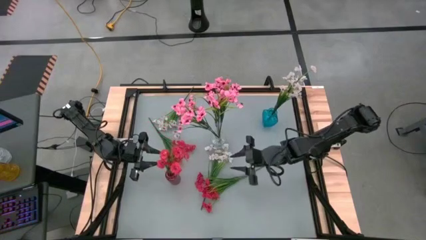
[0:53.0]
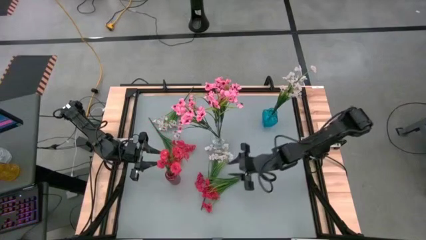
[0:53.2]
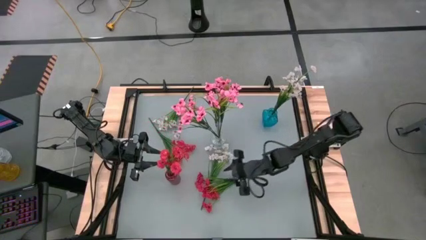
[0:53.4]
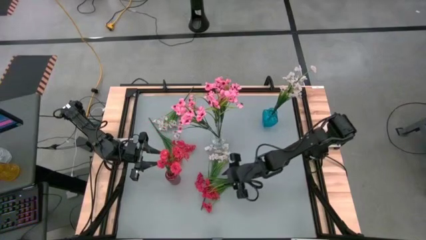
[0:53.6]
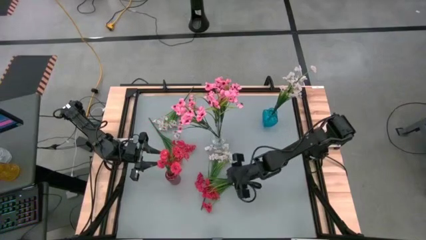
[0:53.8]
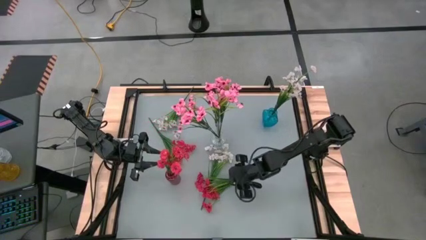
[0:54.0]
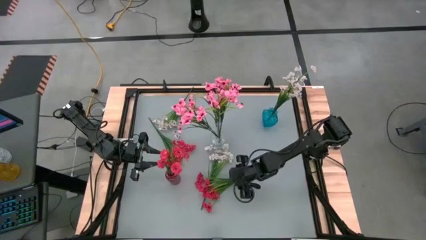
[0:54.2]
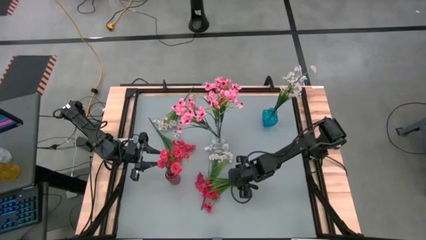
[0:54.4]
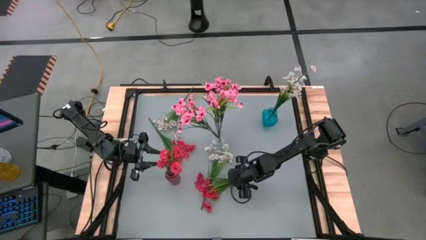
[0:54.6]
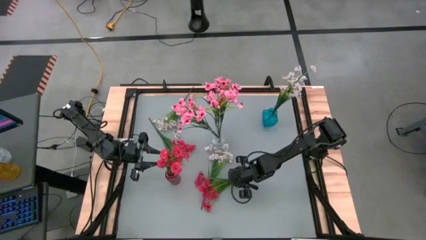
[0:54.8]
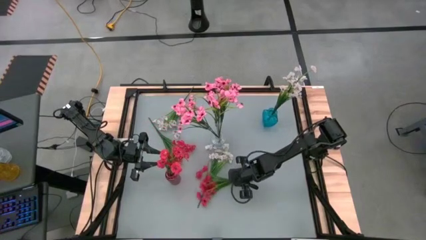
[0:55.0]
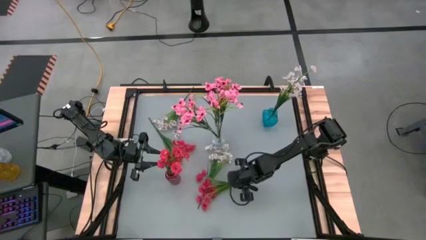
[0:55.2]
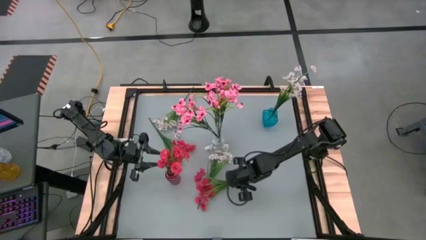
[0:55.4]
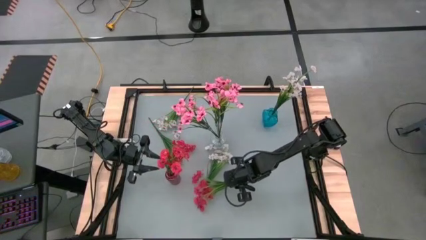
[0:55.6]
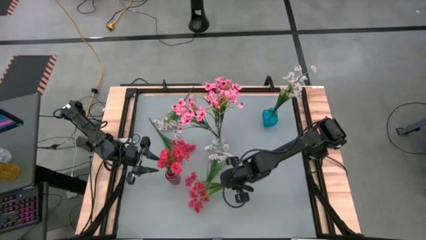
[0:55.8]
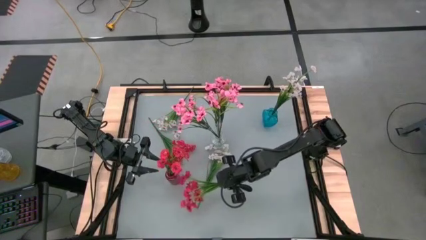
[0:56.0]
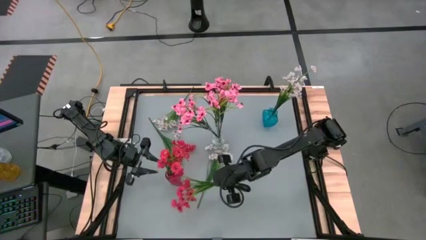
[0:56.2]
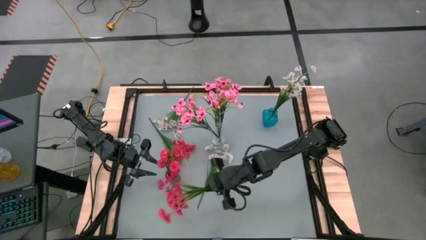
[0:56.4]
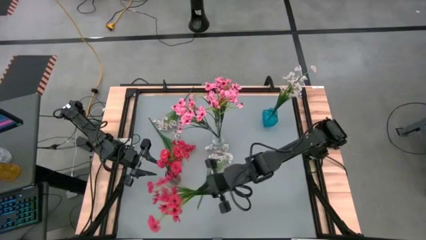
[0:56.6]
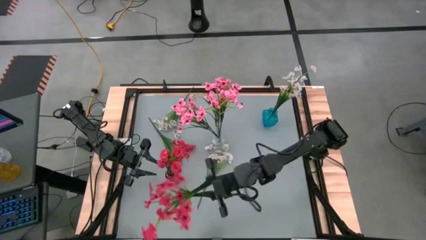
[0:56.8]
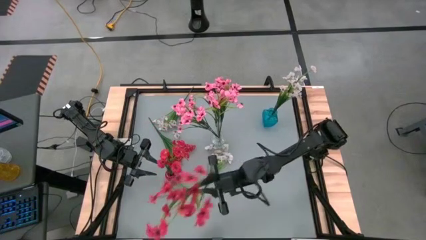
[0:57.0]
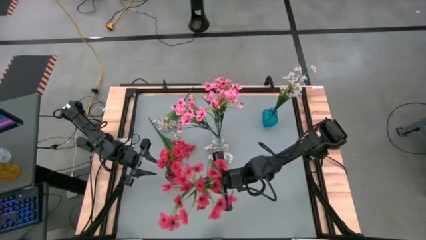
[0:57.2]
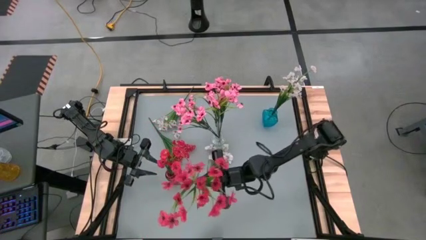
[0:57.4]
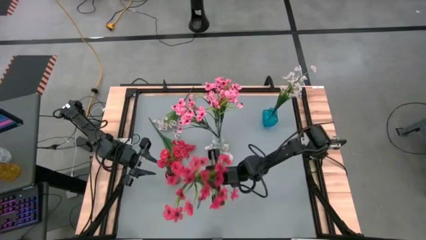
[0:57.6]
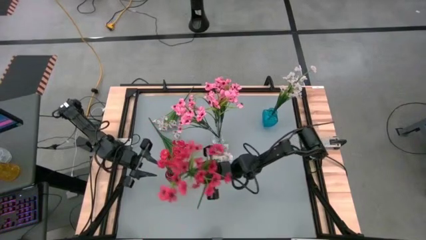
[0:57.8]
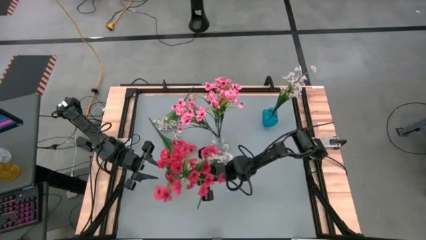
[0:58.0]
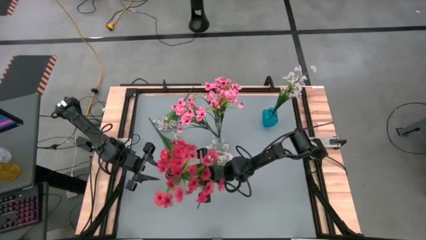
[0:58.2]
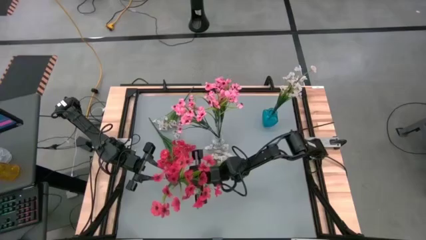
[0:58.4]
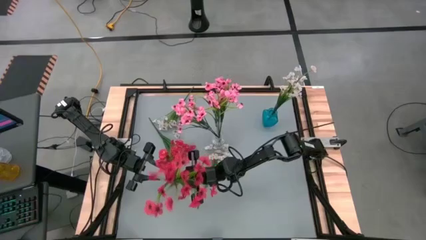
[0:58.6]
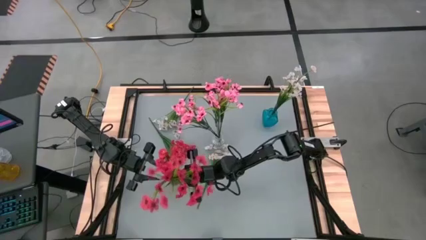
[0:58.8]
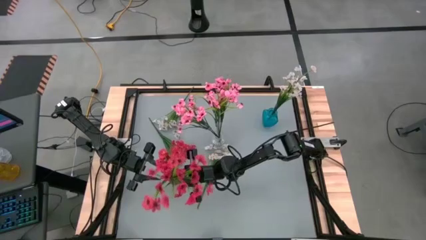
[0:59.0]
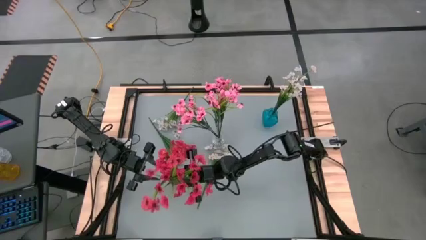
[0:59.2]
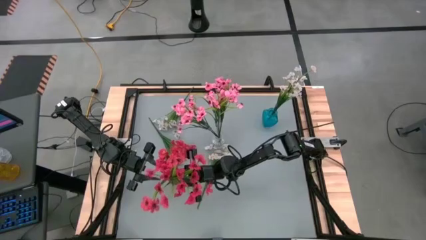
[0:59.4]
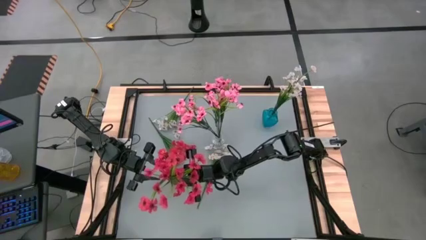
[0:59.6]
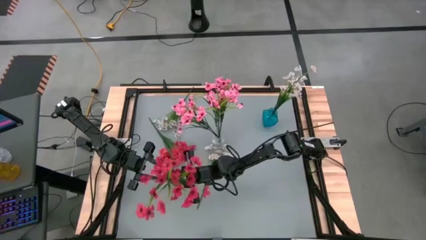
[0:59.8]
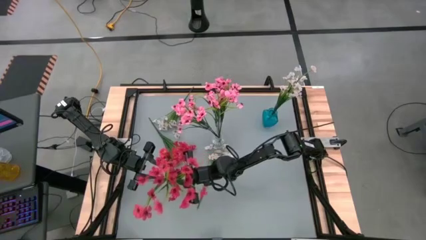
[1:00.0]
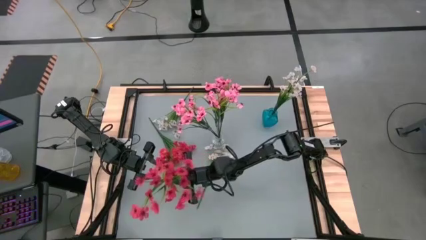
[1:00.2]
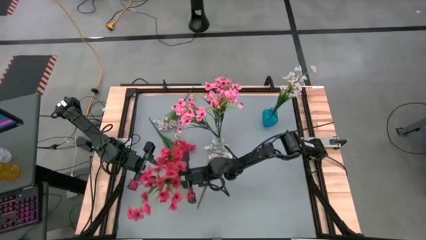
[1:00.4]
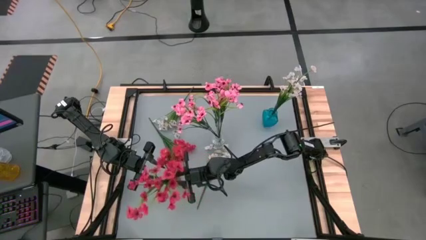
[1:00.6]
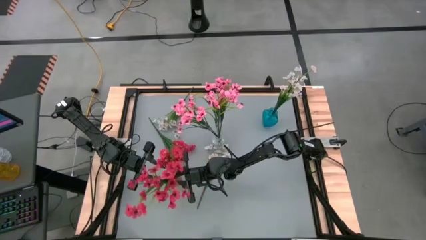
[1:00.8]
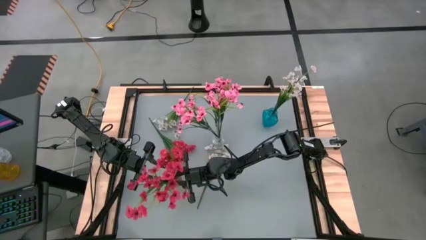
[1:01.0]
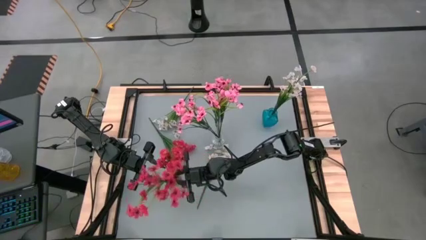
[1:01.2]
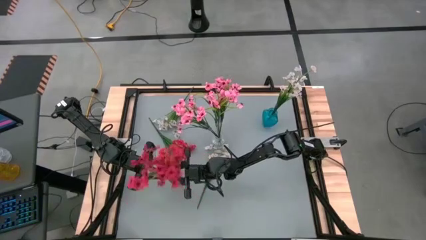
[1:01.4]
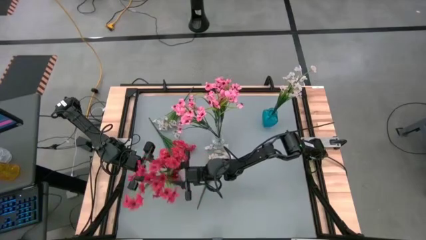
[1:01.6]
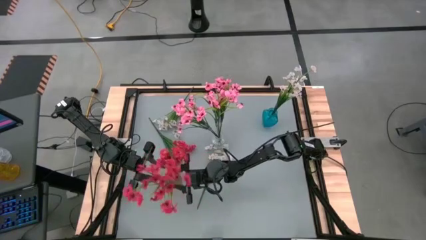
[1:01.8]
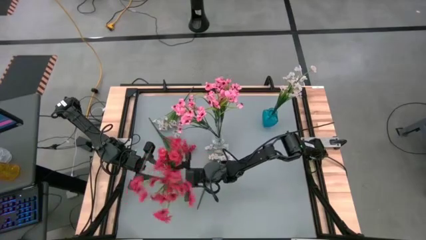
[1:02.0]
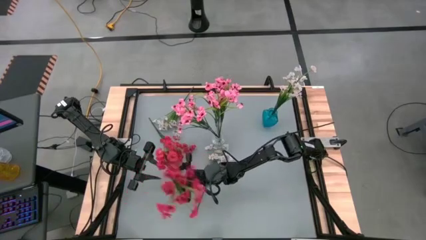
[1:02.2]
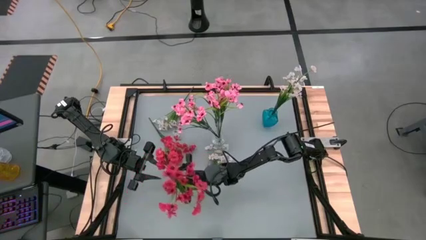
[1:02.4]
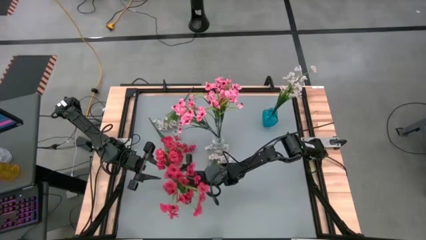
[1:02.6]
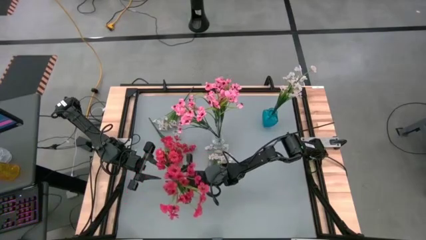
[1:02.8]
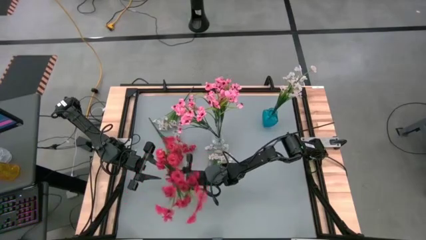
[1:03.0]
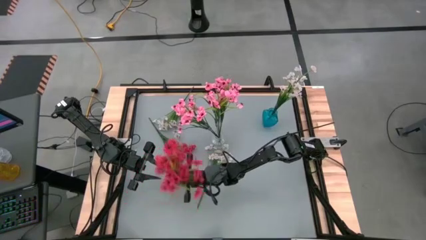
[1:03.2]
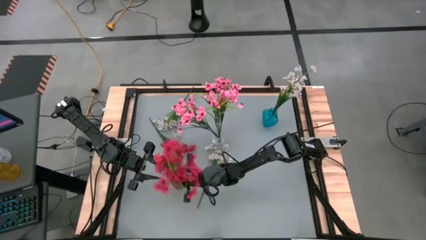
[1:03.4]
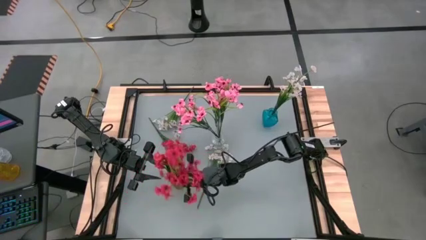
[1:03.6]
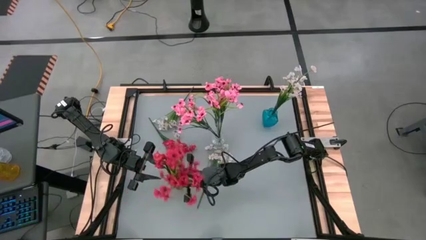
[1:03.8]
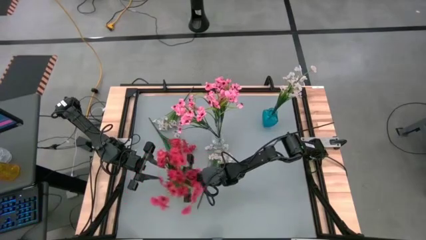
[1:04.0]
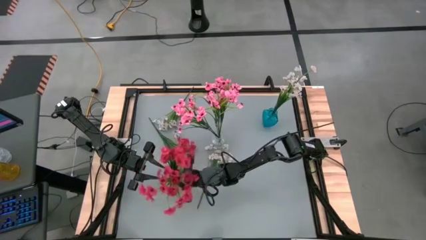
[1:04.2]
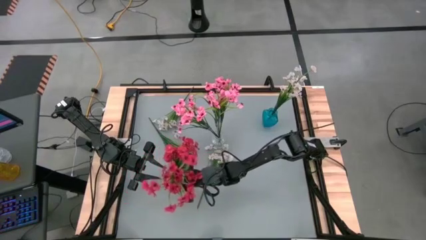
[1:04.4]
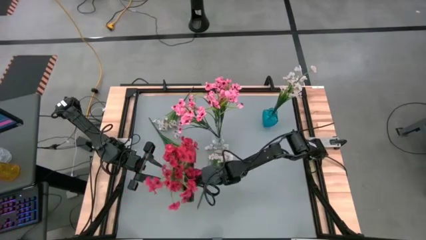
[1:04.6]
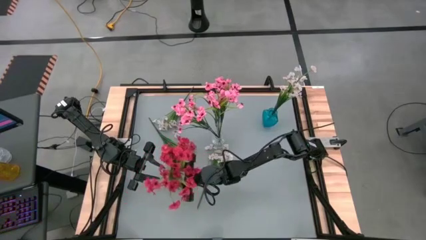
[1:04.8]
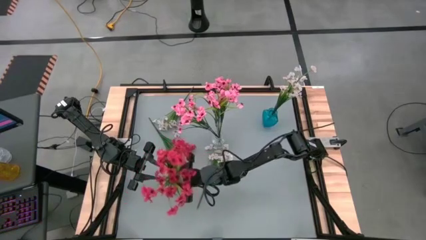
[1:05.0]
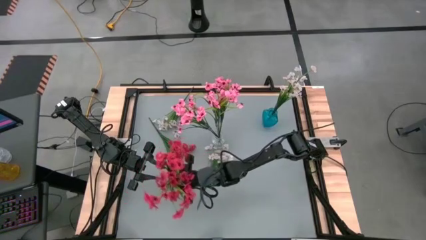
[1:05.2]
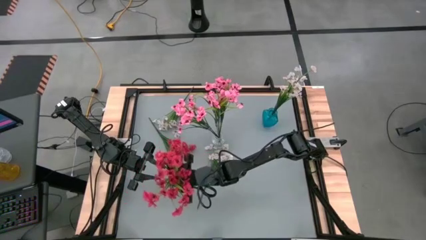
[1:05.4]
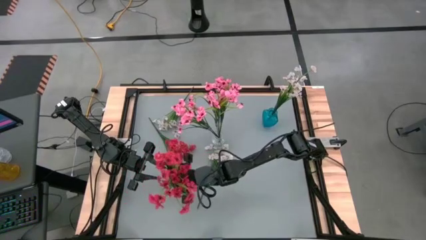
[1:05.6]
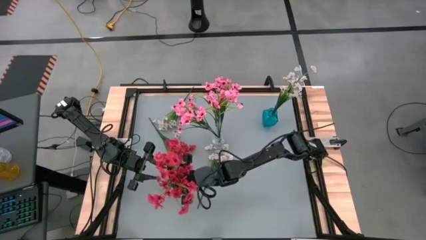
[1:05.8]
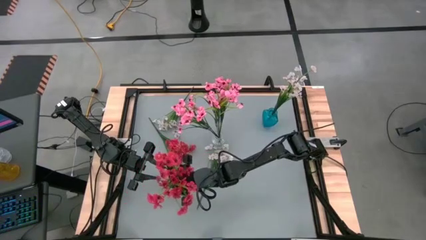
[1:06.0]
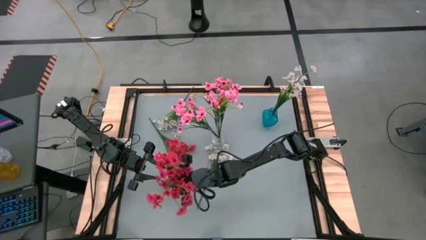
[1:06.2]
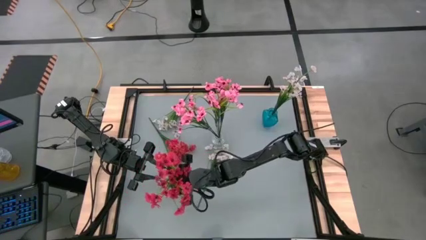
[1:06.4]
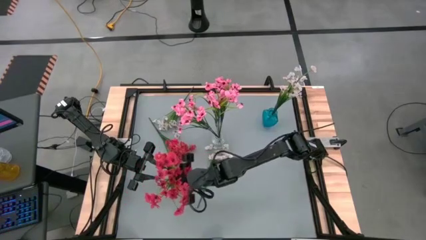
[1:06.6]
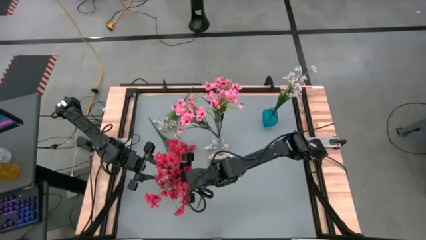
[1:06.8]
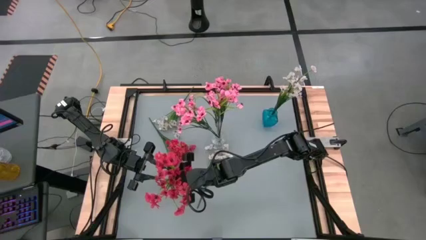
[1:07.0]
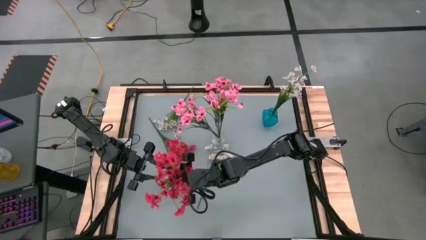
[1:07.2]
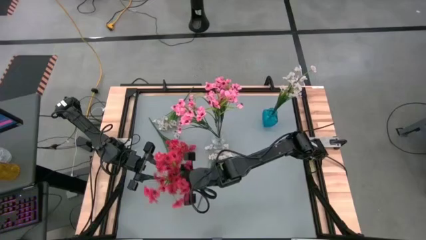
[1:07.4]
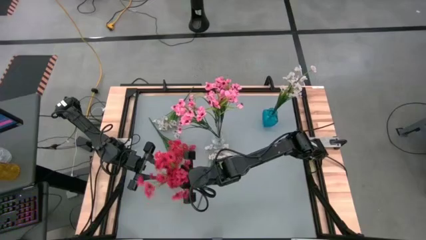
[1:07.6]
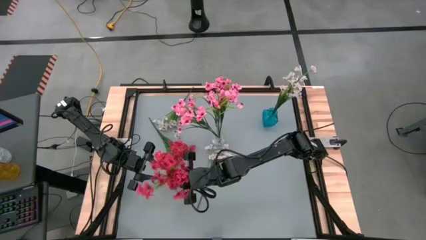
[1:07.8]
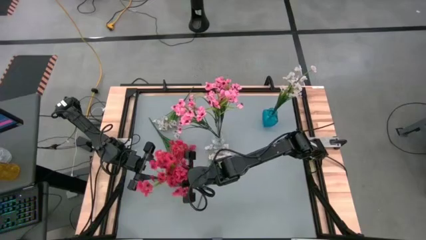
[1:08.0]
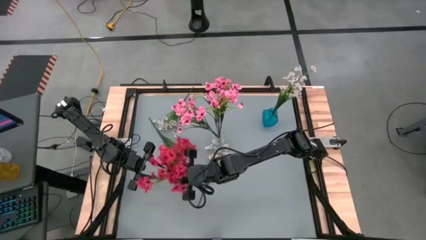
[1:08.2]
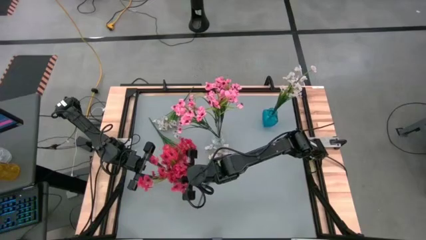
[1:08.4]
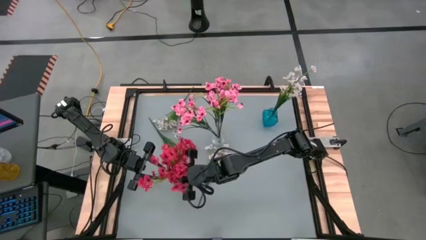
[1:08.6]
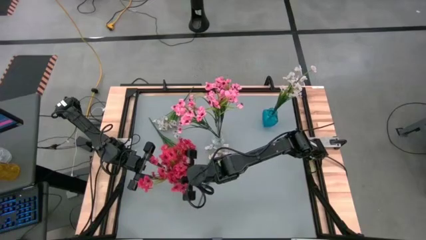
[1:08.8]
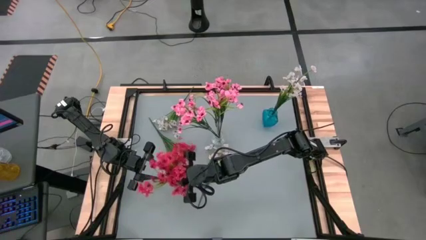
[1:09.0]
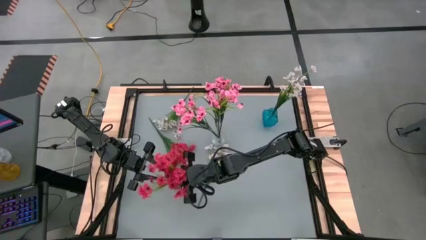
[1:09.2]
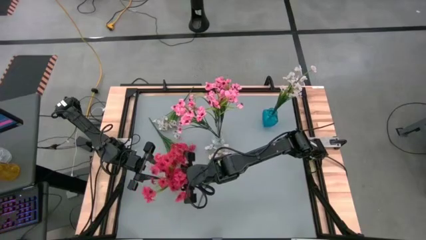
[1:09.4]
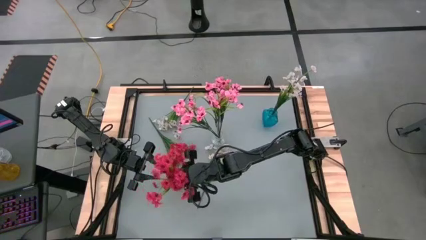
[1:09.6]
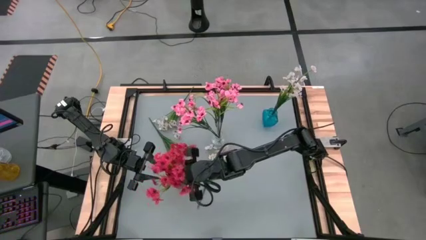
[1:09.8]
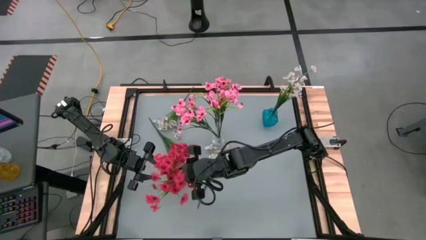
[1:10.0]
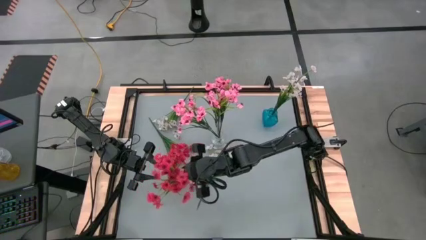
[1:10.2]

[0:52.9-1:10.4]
Task: Sort flowers into vase by color
Put the bottom red flowers into the red vase
